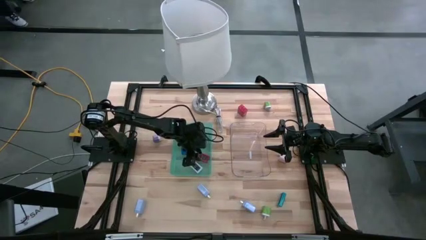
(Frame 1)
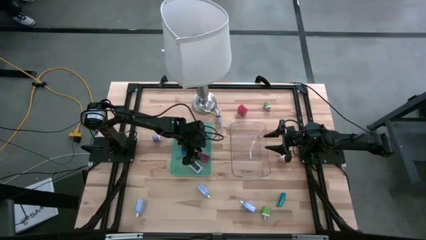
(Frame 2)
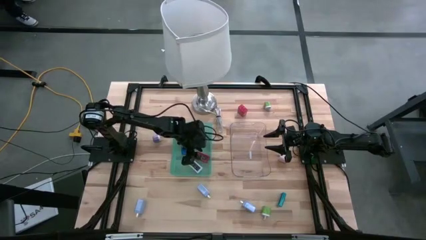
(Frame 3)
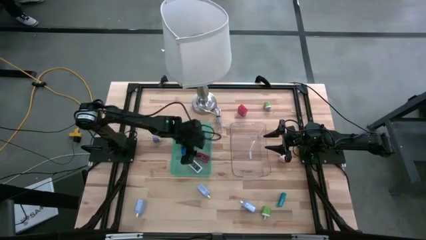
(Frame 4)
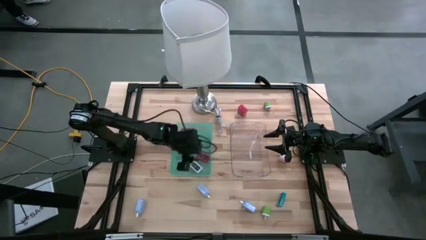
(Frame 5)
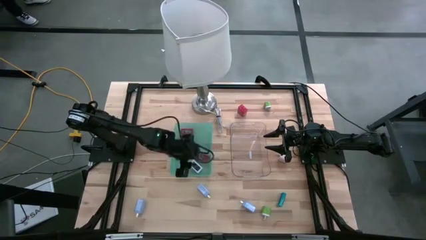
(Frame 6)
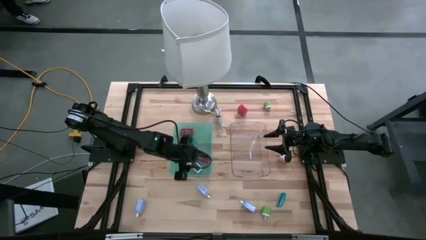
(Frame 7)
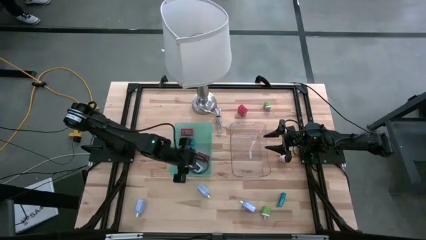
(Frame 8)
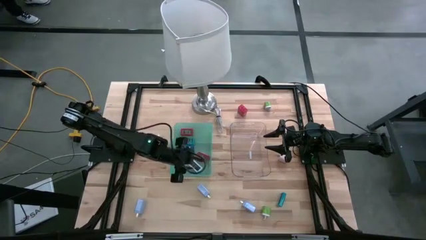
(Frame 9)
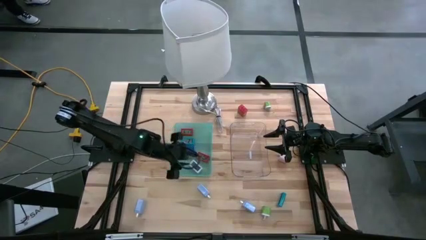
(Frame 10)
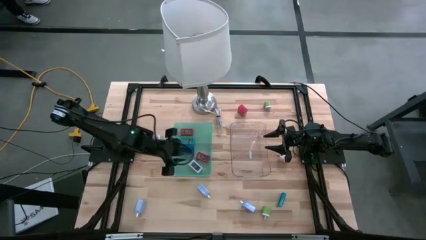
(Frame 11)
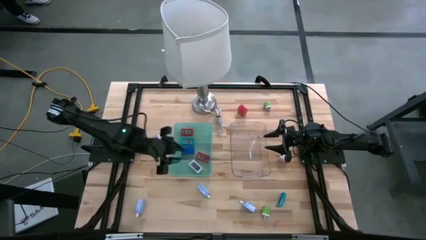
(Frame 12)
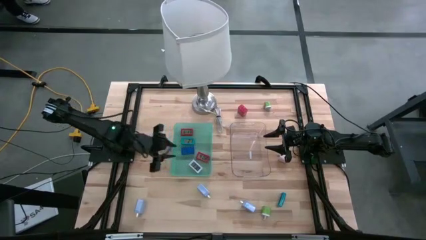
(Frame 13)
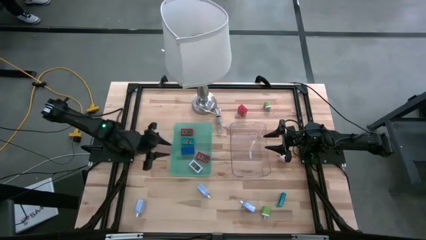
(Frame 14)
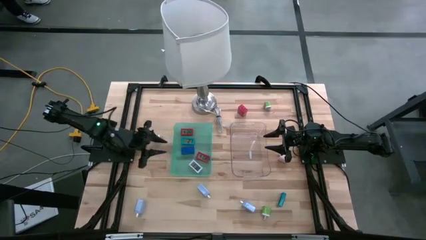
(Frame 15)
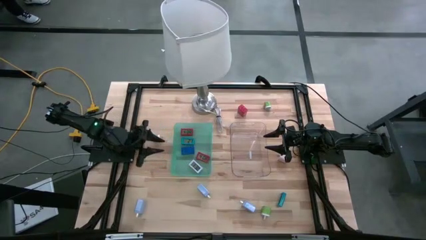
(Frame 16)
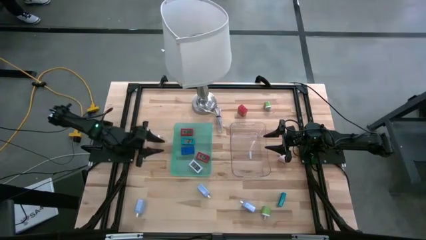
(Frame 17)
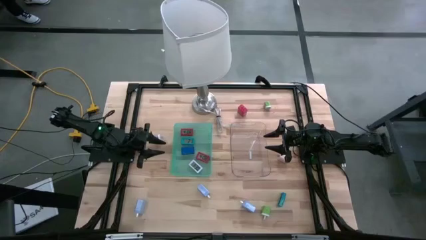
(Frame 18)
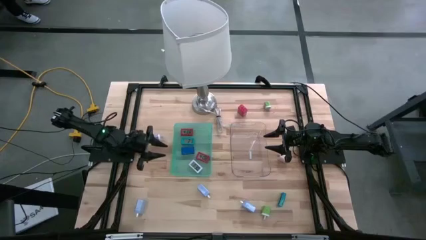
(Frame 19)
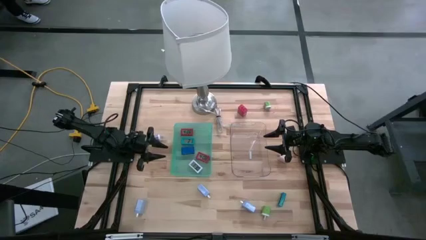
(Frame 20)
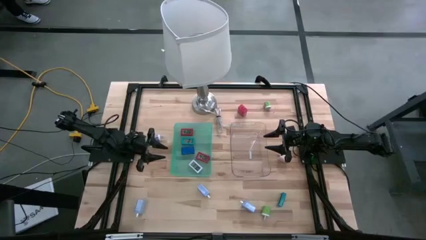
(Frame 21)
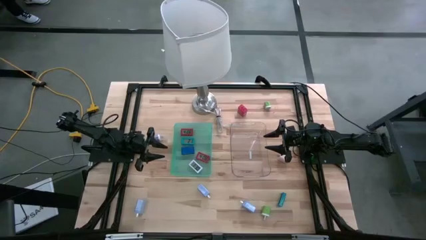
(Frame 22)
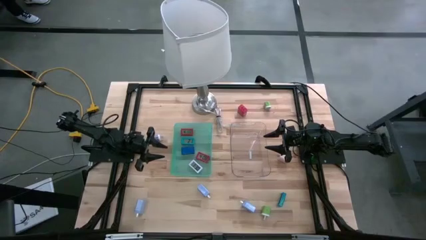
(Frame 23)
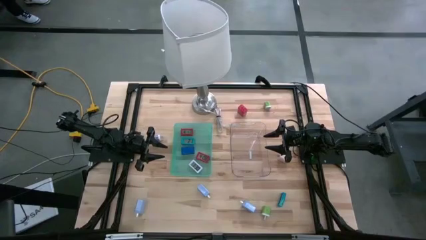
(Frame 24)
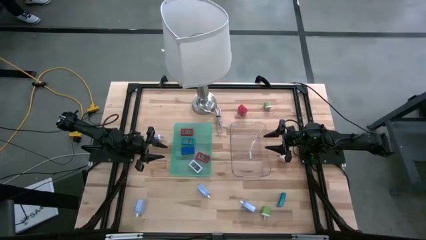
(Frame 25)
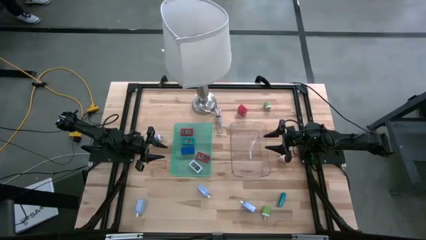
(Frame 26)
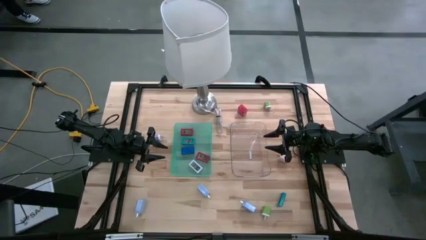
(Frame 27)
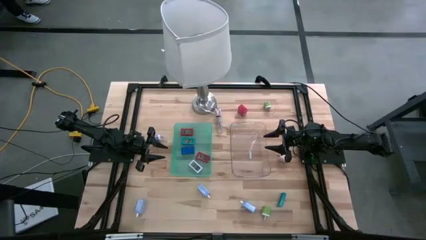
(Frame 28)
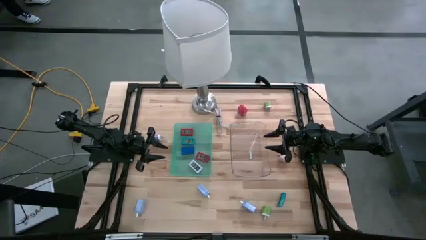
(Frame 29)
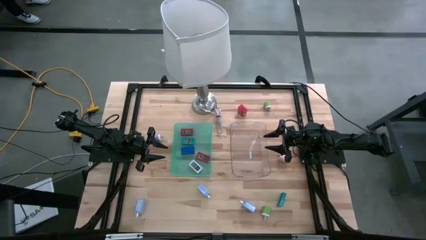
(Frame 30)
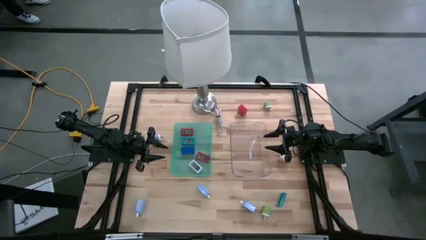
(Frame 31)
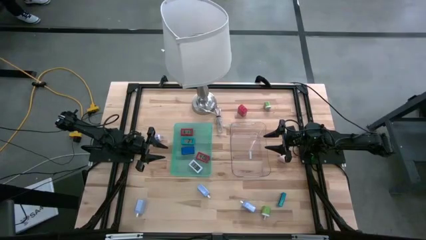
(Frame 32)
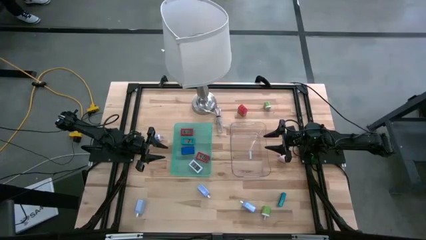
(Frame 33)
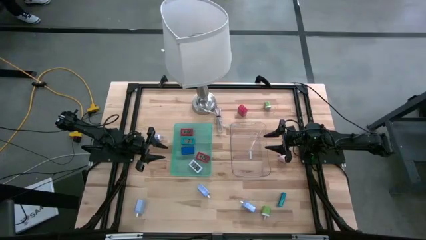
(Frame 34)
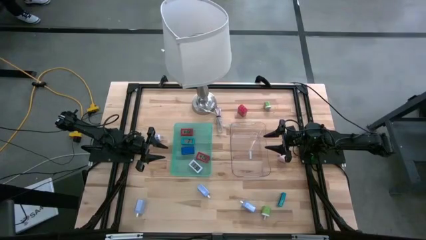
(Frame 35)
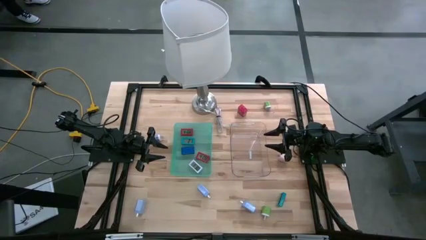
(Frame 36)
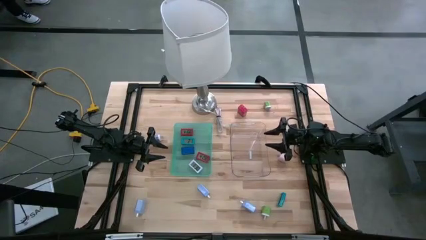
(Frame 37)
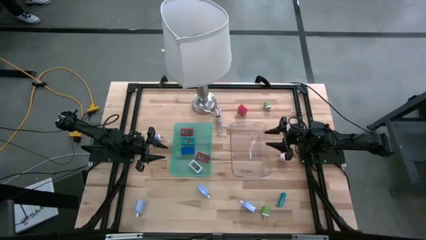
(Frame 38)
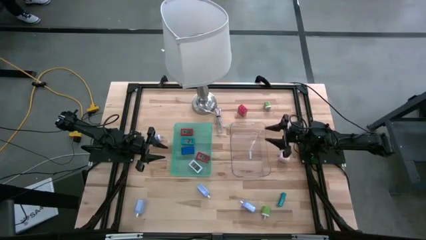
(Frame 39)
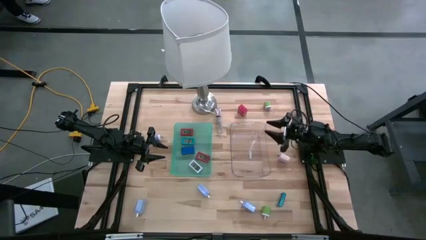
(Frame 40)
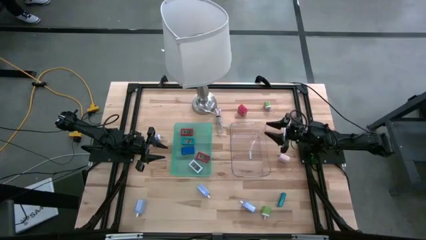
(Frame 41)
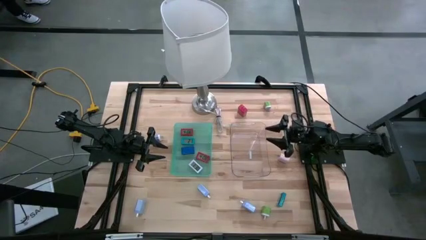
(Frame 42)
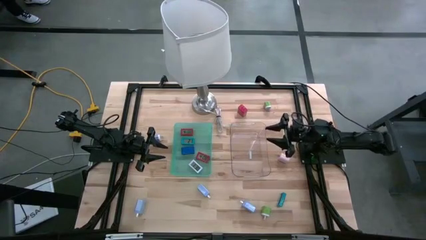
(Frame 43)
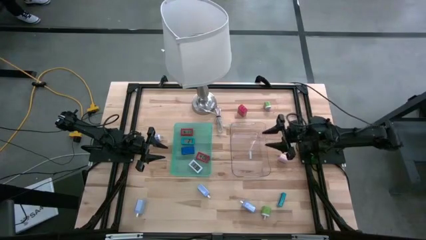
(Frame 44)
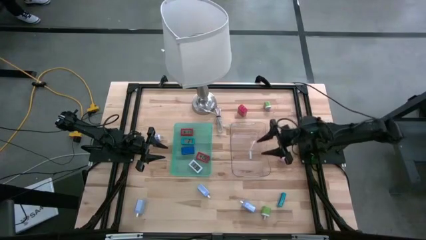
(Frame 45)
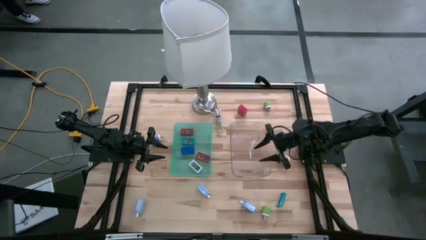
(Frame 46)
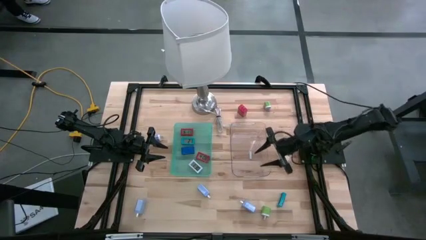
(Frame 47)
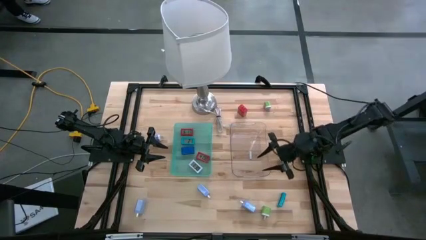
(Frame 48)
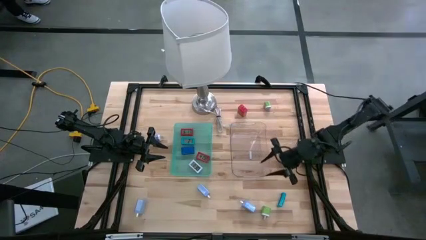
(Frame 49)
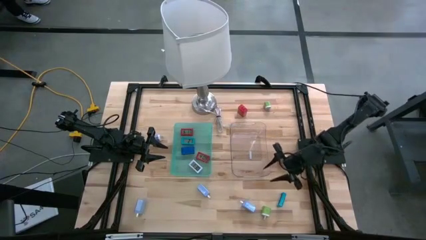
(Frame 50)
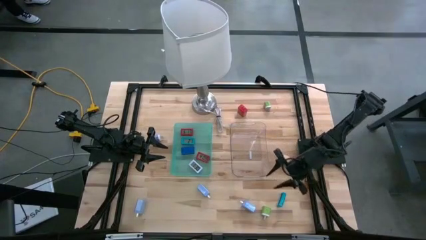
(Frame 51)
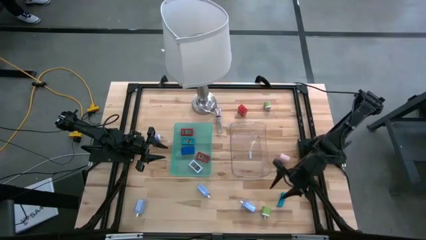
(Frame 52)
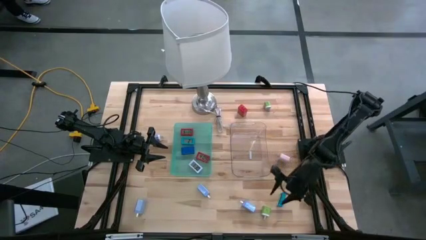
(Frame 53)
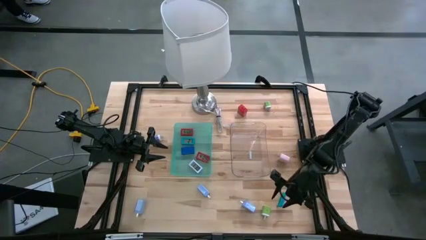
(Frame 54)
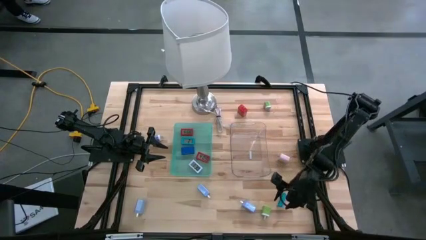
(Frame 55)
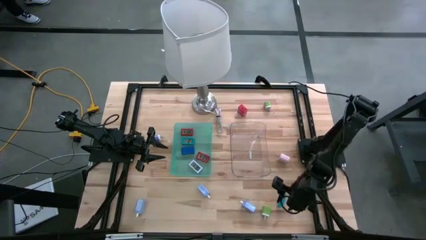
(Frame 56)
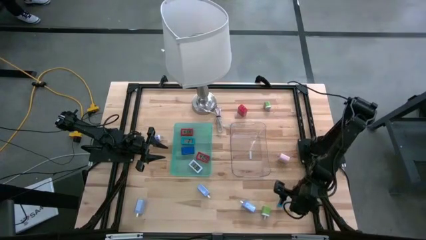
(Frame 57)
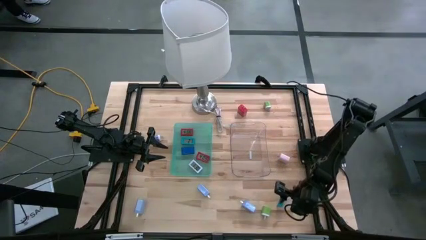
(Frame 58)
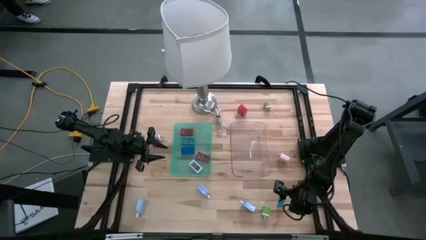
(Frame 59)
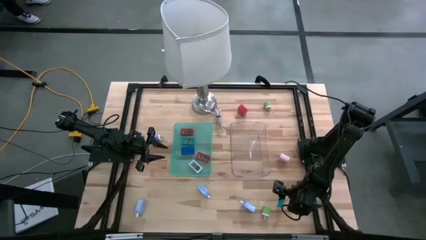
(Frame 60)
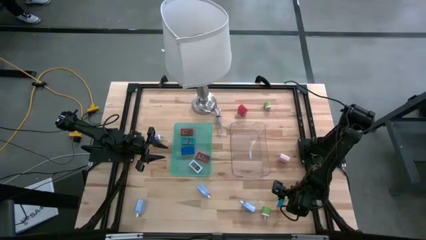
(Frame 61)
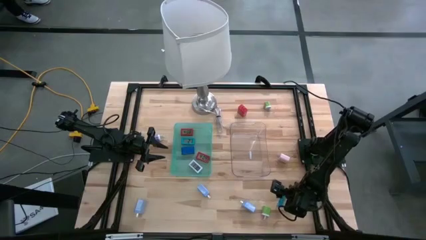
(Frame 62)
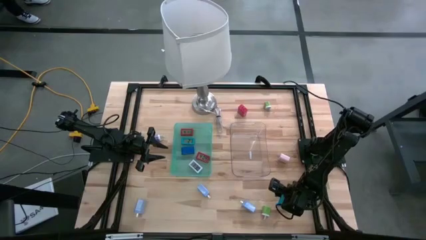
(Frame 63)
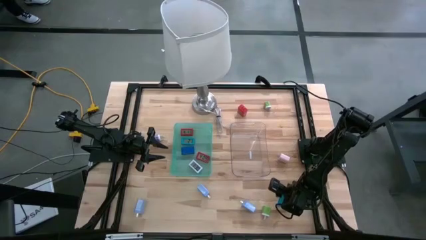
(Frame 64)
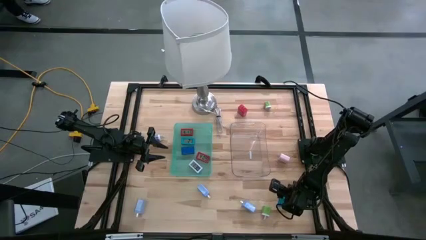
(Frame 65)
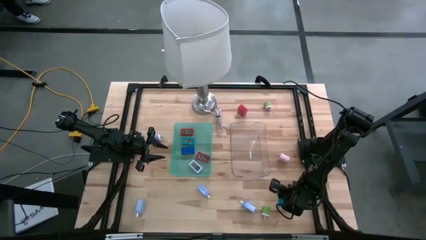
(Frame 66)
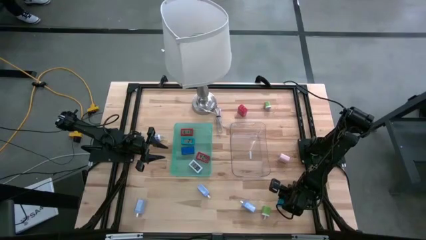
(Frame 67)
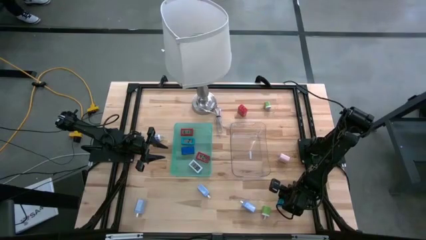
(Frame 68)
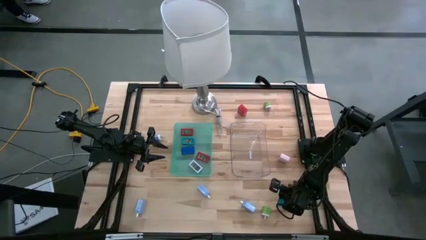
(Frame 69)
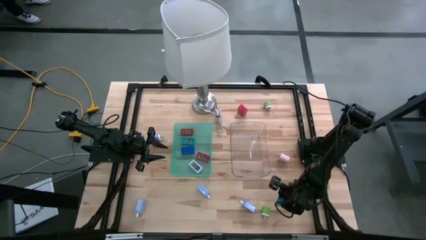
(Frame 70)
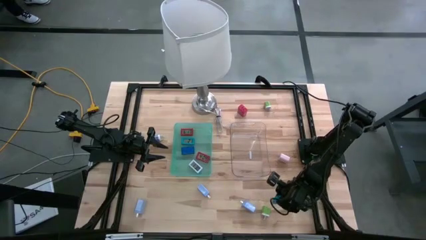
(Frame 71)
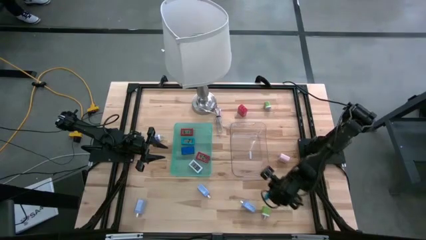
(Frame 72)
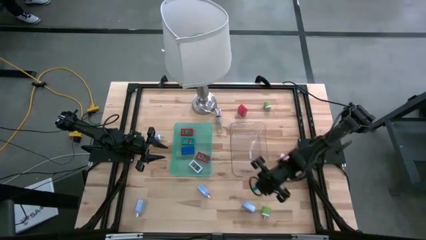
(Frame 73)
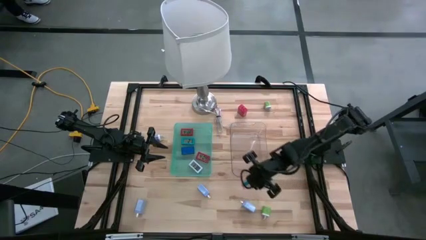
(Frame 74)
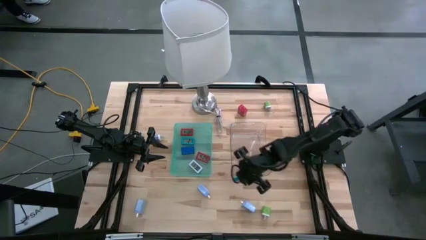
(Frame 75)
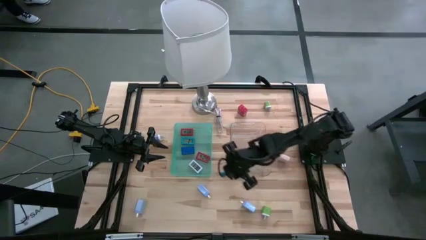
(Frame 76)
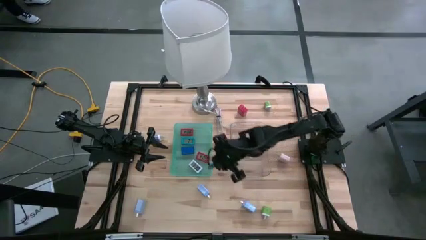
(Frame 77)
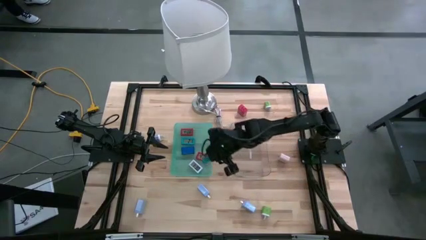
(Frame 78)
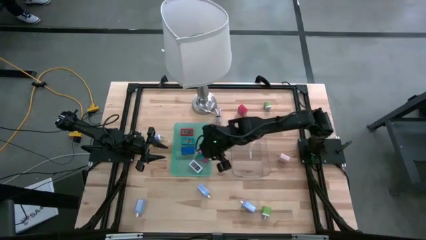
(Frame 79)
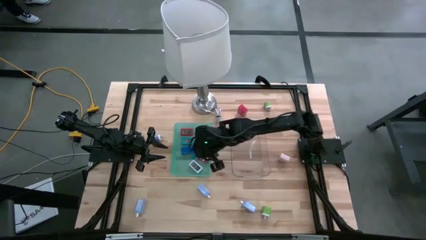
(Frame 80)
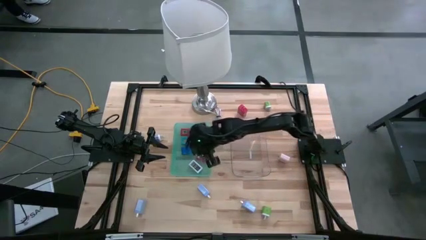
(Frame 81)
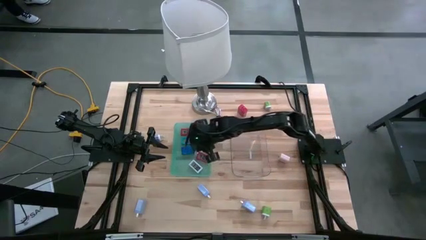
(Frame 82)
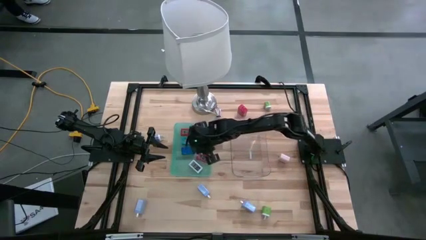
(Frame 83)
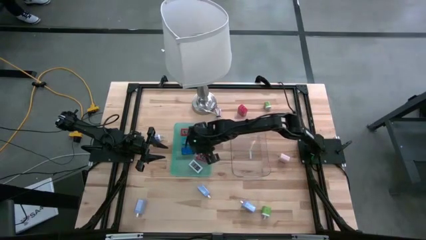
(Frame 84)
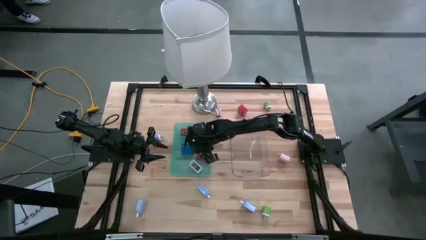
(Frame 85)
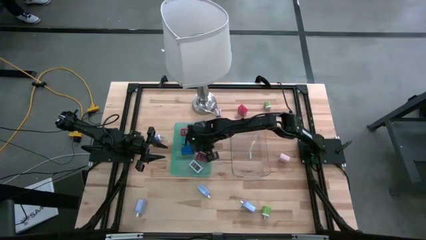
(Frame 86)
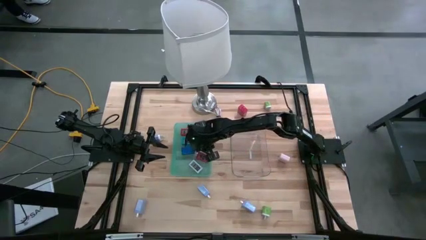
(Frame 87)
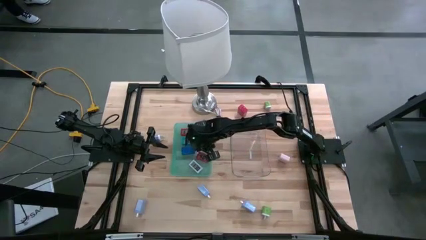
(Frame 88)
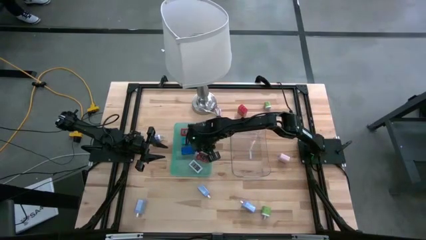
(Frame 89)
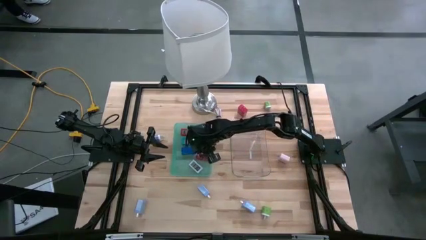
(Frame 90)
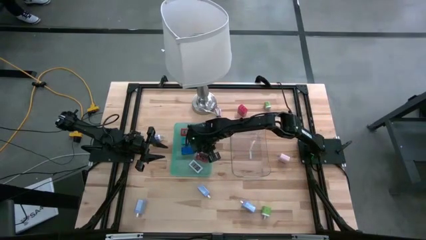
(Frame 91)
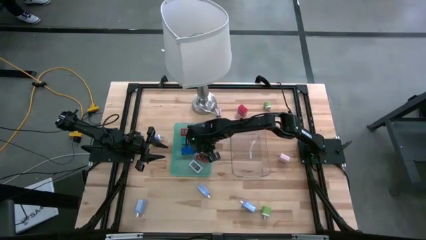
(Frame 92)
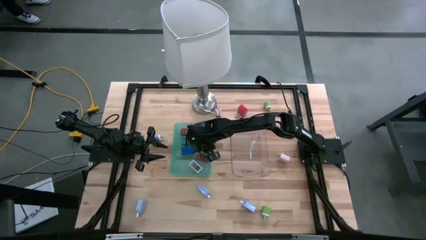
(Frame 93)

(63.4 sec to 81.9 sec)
Task: Pick & Place Office items
Put the light blue digital clock into the green bin
